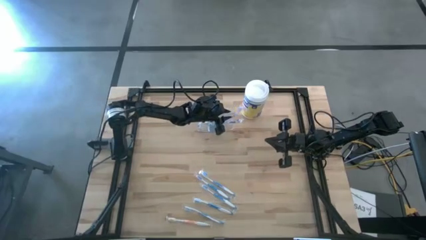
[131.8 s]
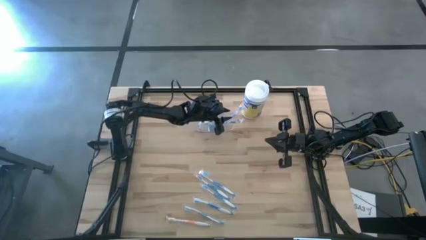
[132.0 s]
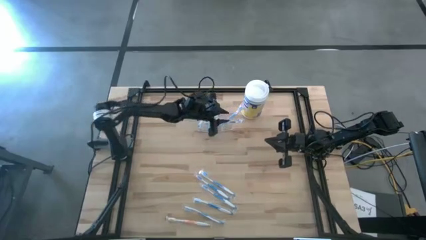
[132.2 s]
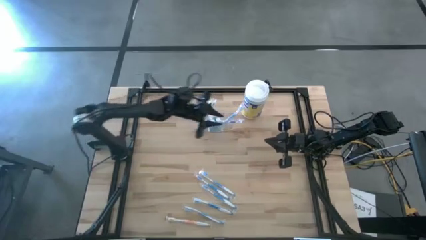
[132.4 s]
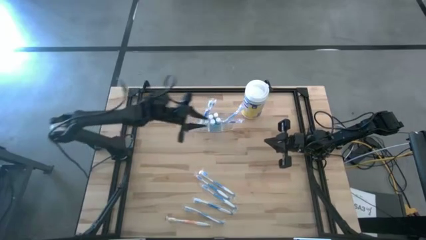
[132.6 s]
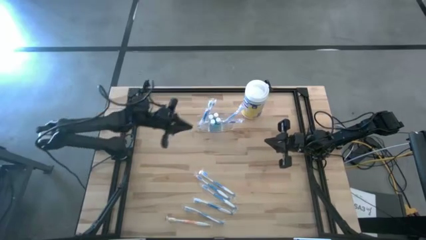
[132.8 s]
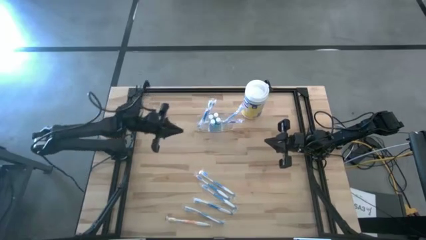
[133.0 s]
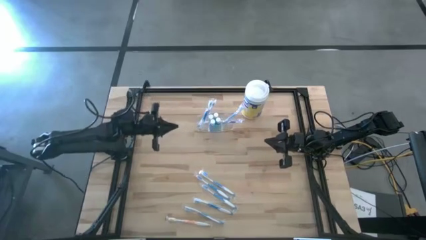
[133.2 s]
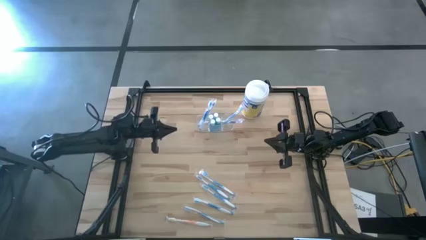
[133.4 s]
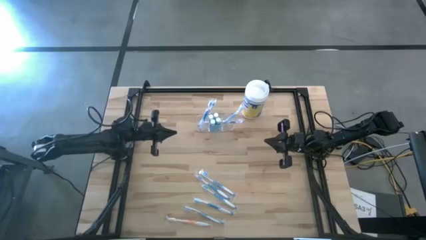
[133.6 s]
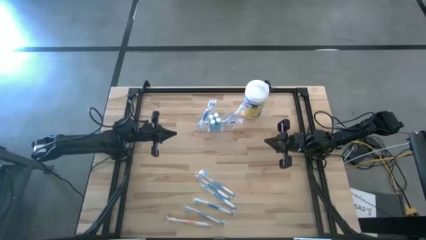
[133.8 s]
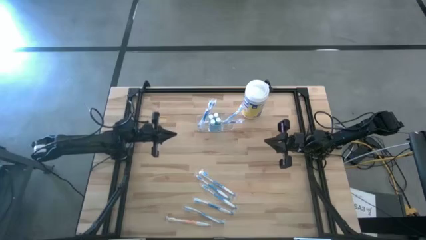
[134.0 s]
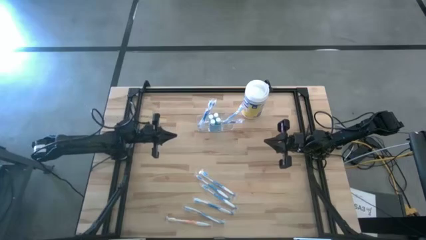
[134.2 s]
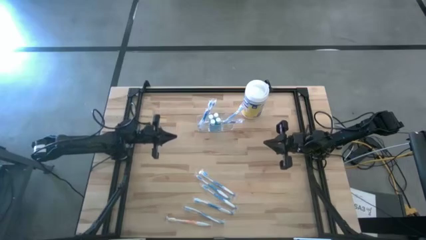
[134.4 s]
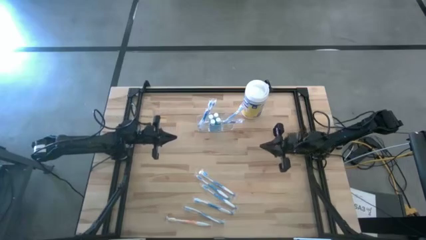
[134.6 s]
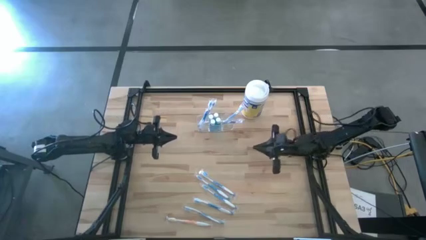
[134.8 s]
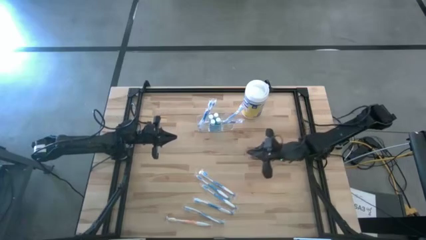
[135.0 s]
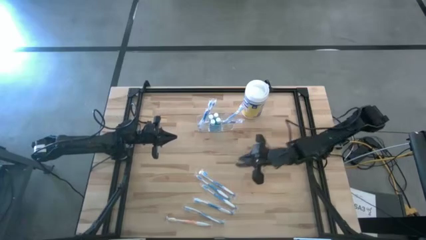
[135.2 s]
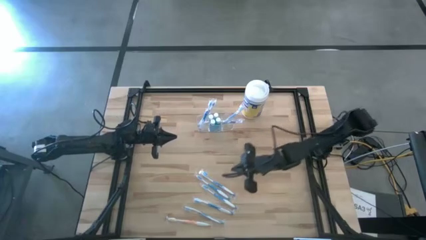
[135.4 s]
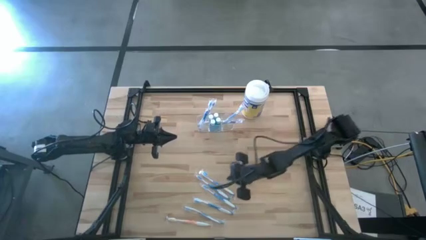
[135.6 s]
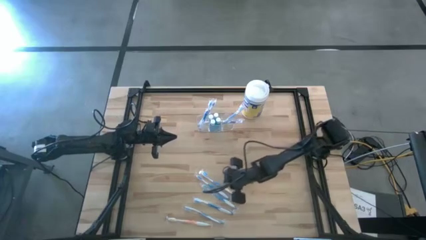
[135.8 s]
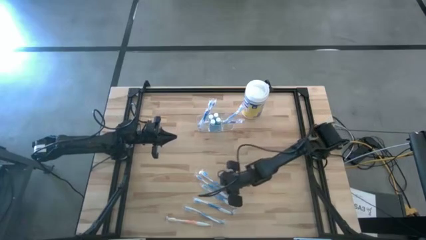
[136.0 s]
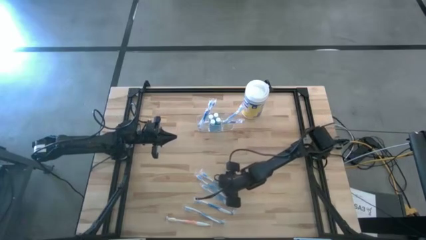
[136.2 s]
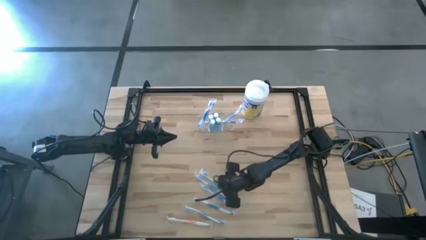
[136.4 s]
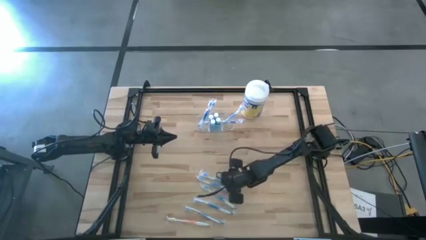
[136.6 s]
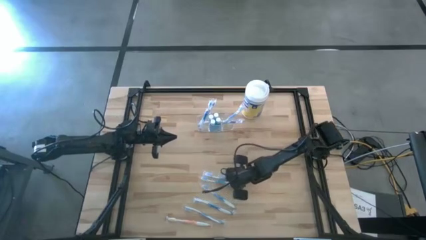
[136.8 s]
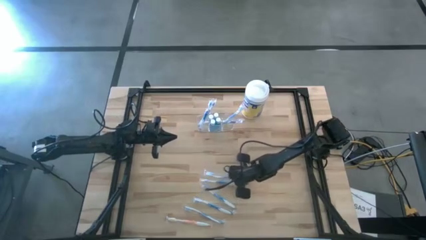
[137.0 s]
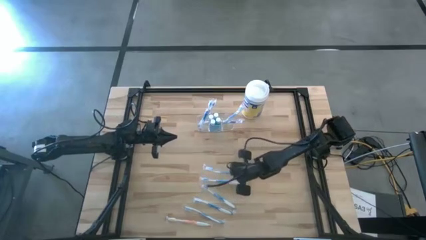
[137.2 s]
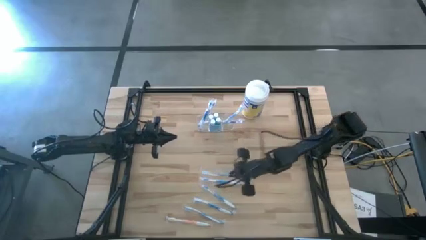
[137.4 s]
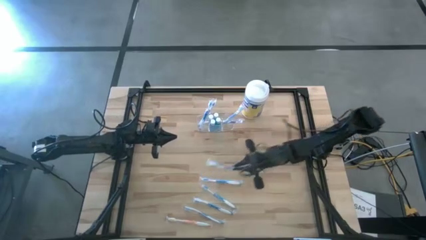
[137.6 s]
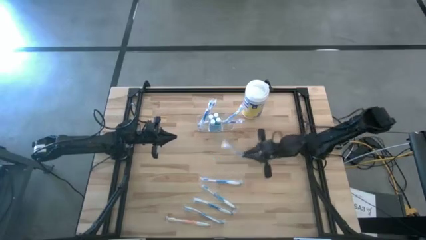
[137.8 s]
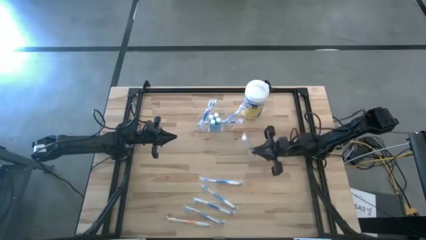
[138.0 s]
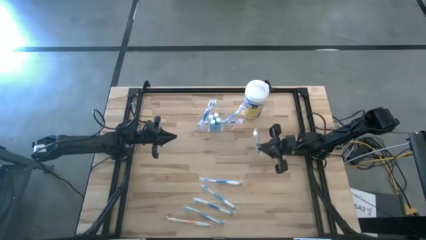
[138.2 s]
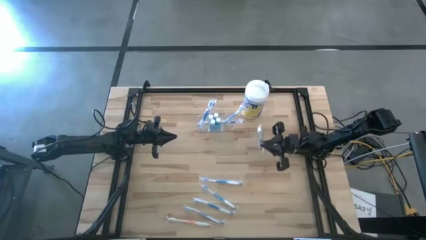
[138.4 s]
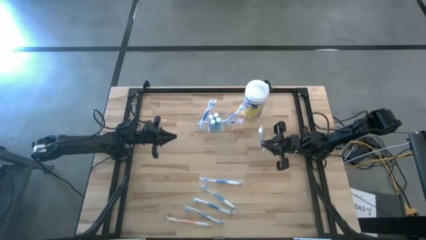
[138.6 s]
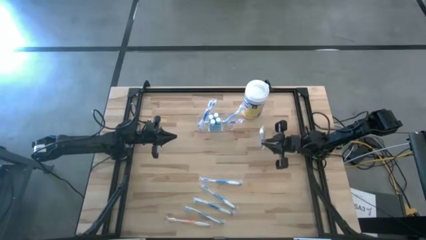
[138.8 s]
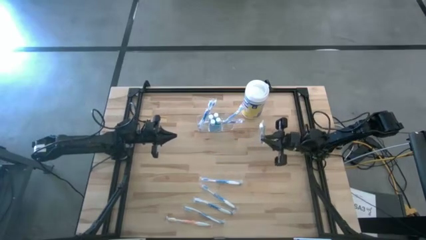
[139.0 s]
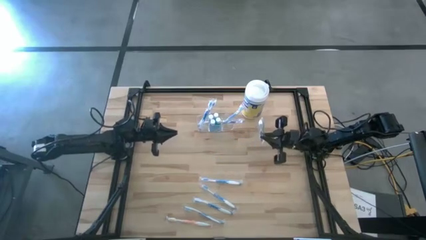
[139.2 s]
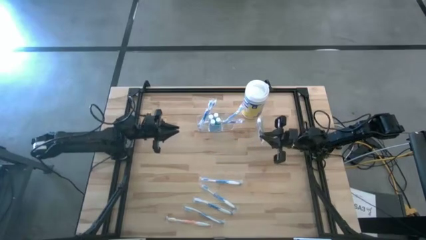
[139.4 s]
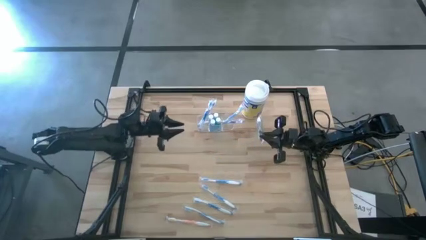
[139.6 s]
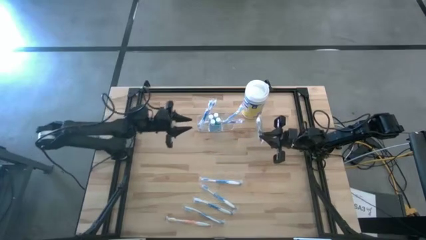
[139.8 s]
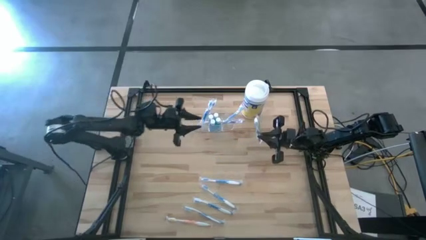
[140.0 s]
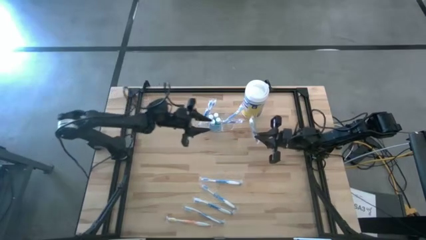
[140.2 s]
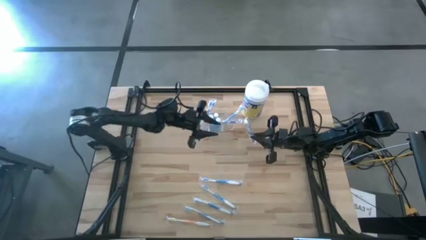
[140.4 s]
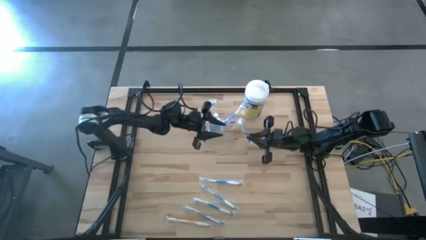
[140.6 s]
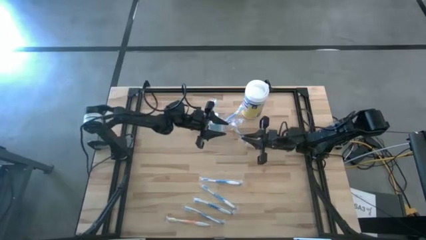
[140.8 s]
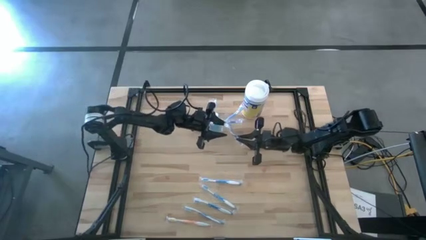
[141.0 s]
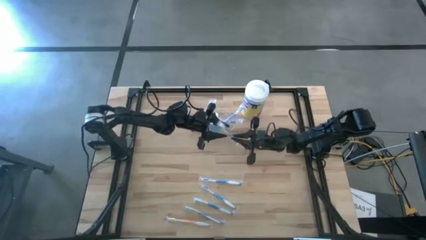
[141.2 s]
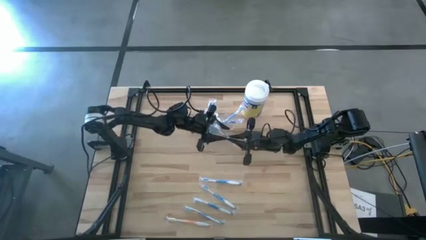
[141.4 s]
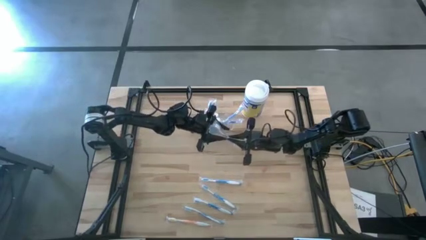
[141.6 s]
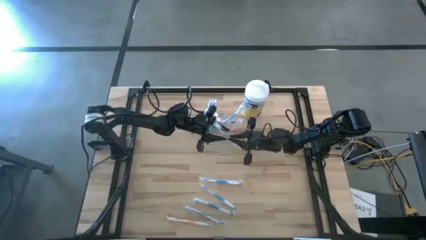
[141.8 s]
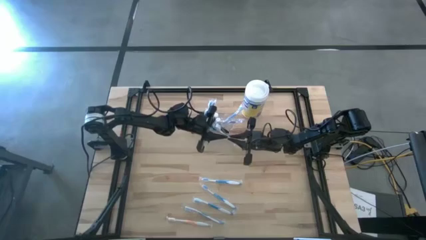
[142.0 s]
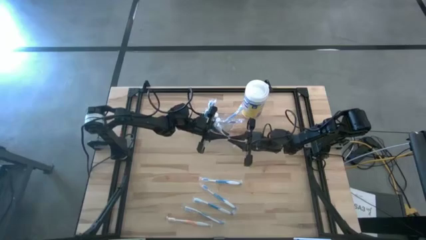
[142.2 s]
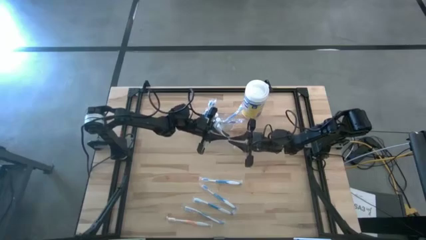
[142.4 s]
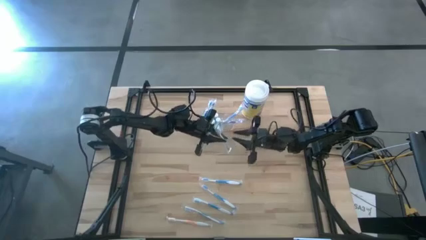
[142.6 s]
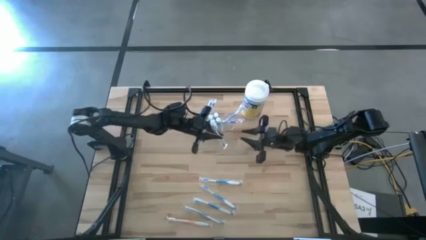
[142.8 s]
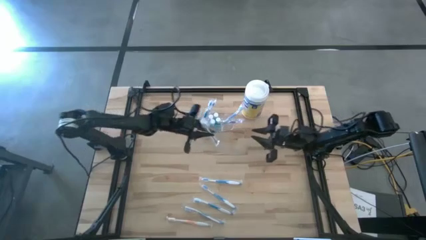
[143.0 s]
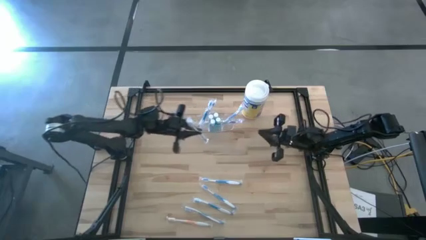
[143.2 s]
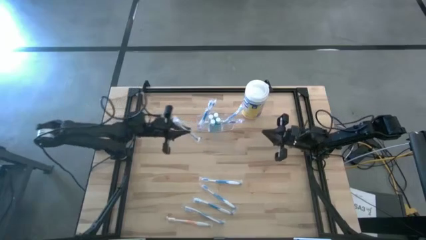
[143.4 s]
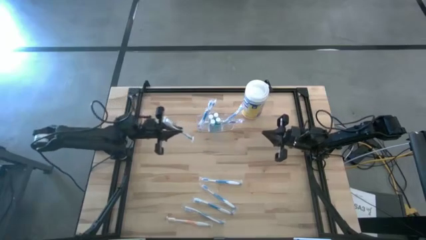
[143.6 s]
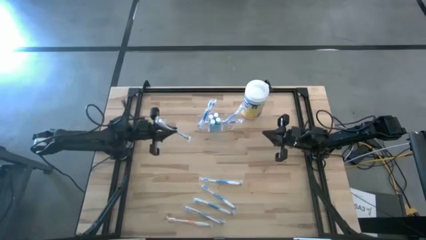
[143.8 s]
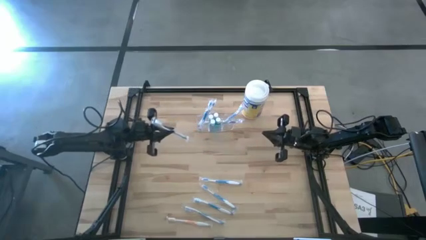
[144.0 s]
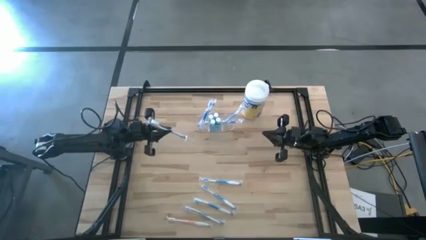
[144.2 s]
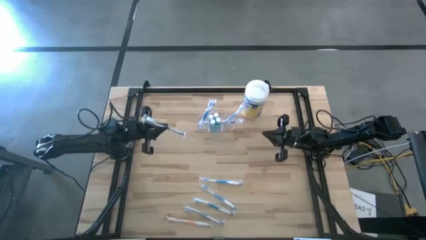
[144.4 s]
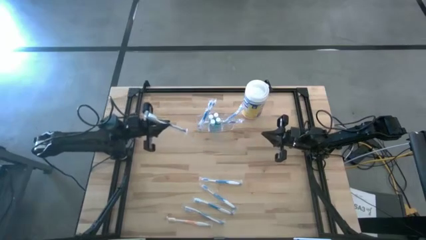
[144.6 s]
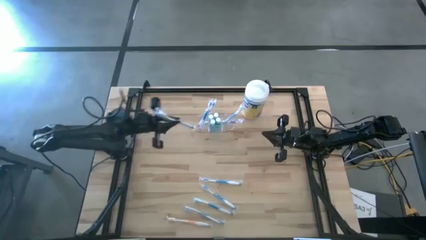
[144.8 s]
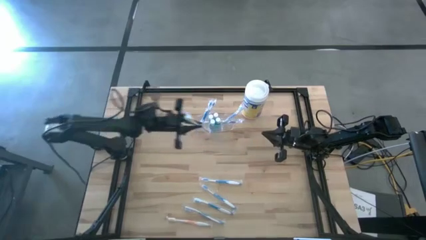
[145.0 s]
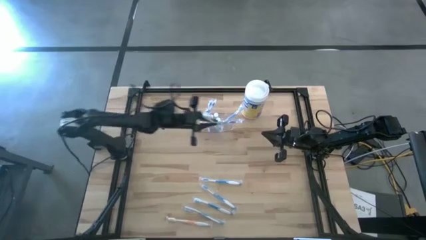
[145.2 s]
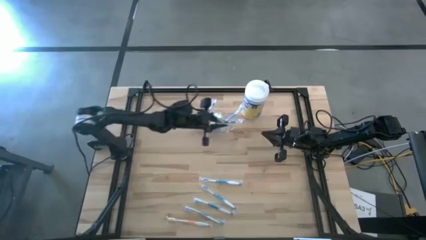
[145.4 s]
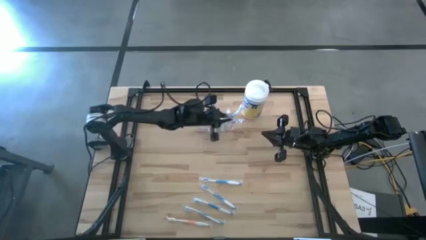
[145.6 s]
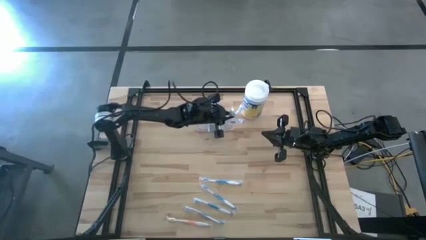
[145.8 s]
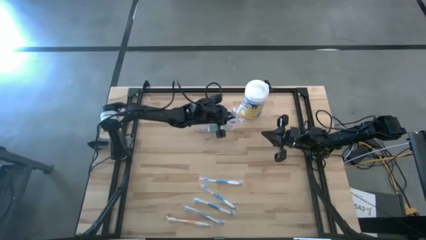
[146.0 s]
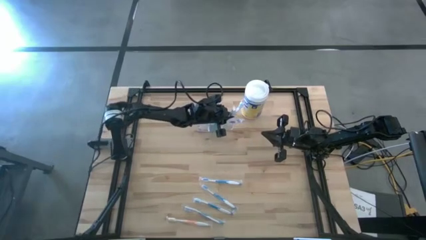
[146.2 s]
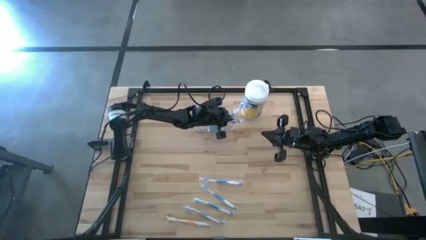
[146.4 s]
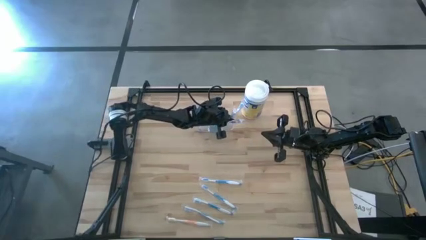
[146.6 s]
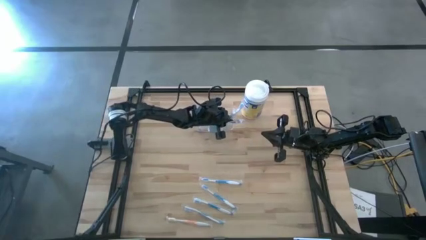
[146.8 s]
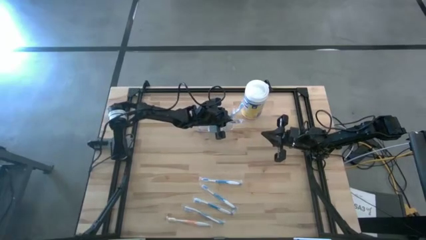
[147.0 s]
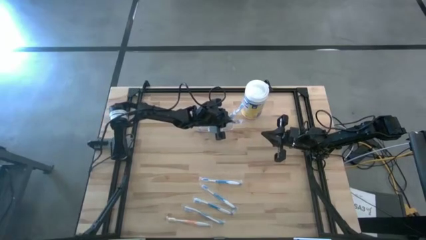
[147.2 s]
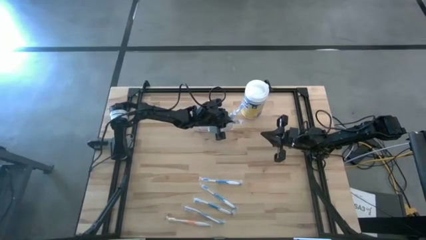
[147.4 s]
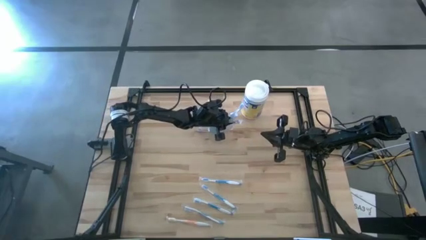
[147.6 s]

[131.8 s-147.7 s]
Task: Pick & Place toothbrushing station
Put the blue toothbrush into the right section of the transparent organizer
